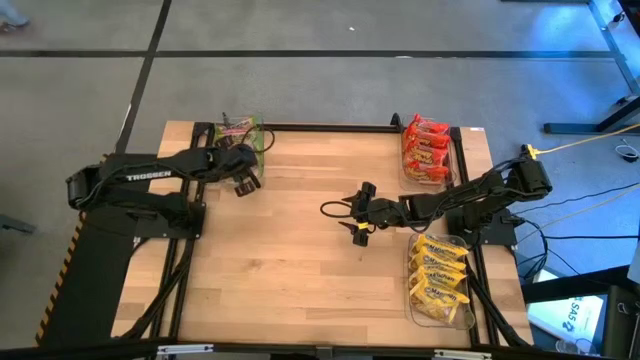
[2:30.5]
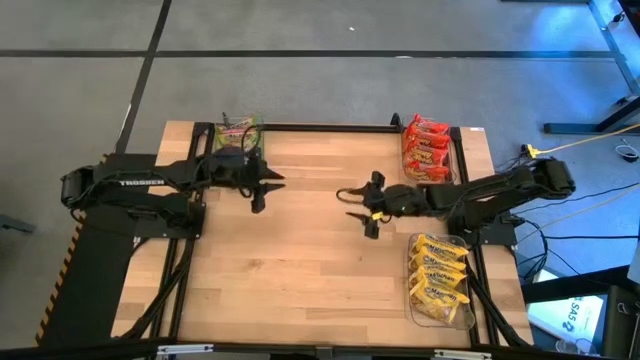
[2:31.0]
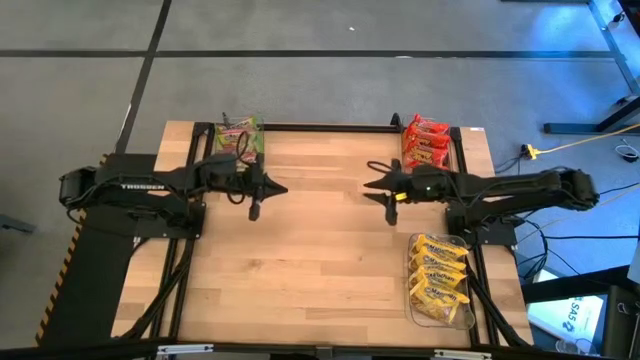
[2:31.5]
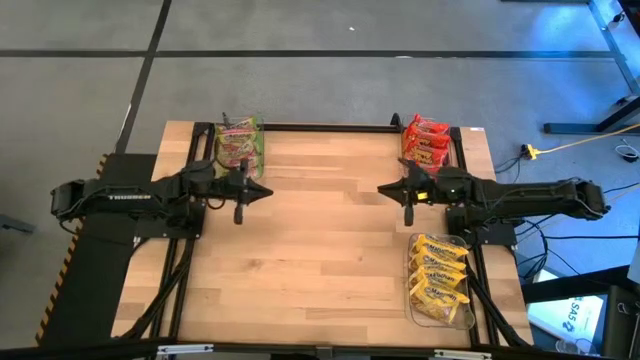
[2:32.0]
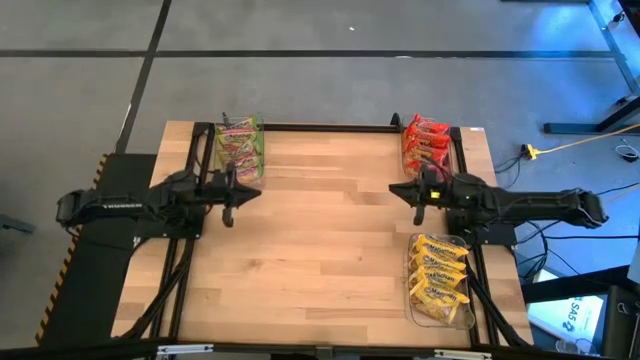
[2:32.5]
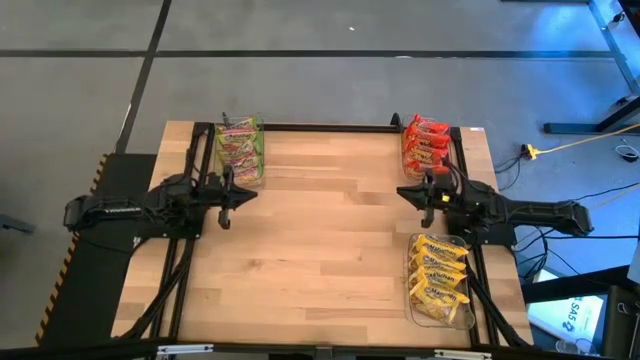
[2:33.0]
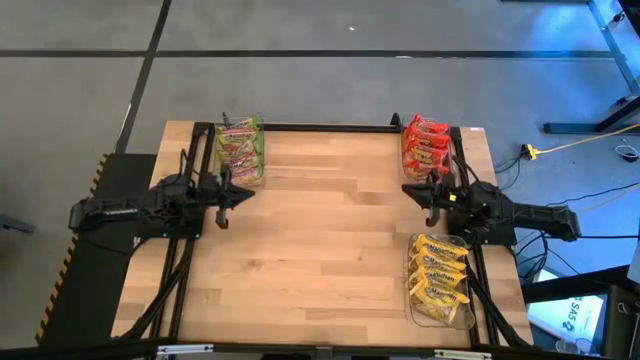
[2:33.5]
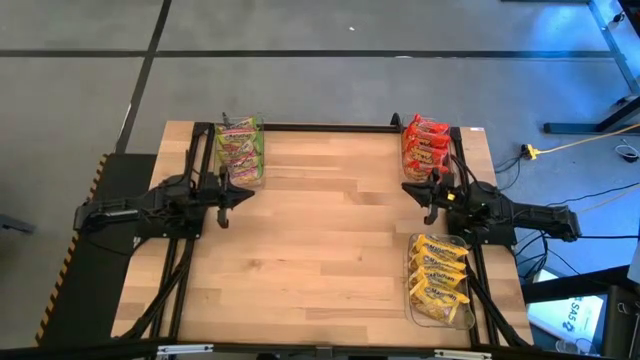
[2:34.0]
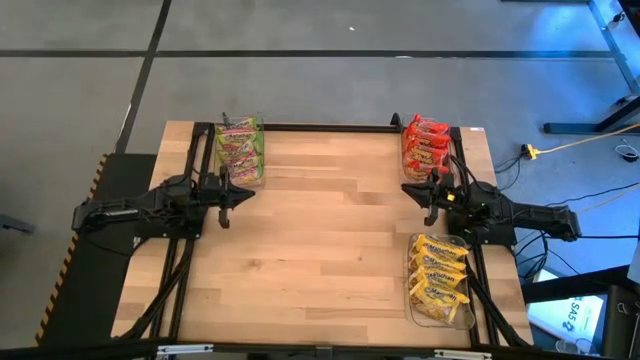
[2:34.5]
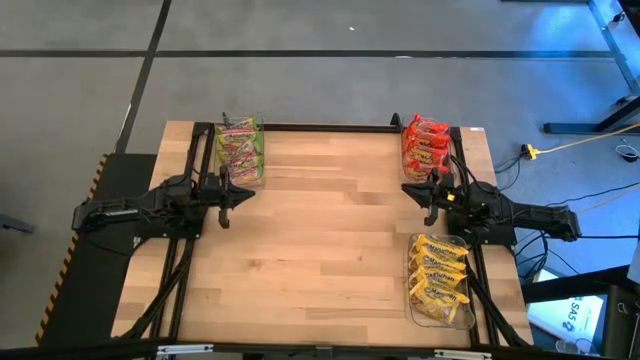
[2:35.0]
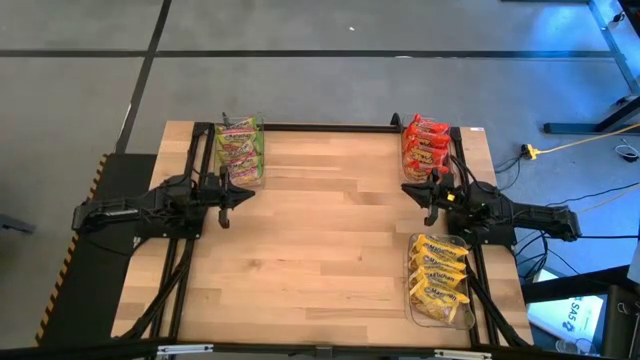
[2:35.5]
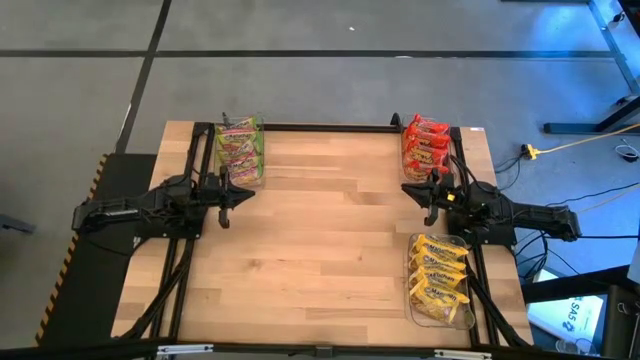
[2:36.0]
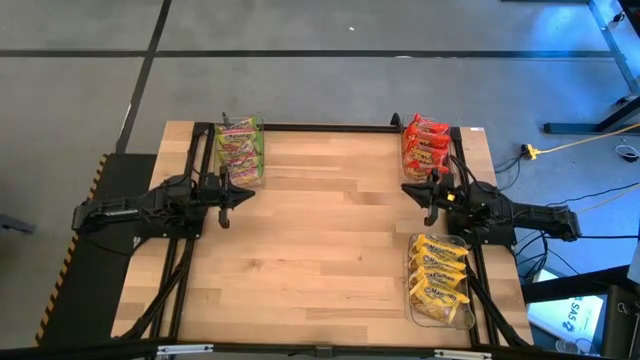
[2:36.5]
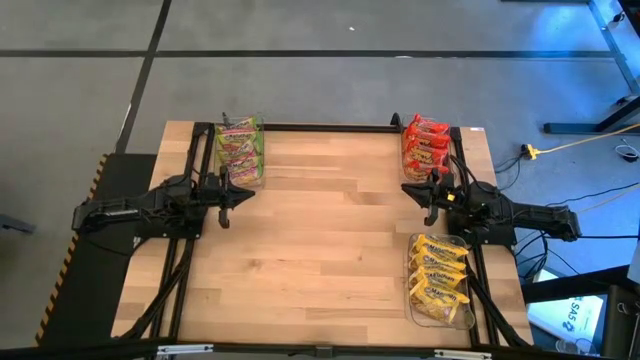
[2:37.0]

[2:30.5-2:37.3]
Task: Sort Maruchan noodles
Return to Home Position

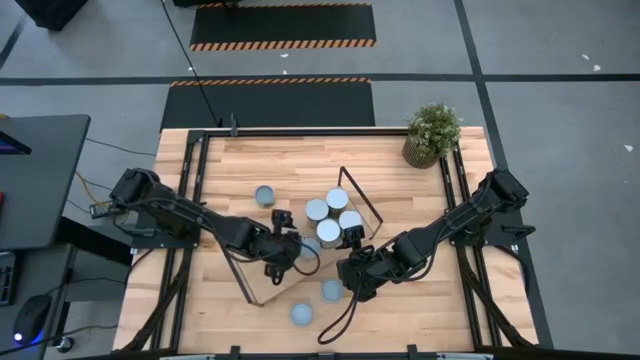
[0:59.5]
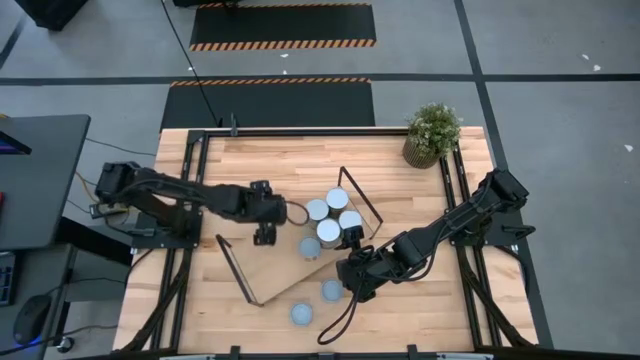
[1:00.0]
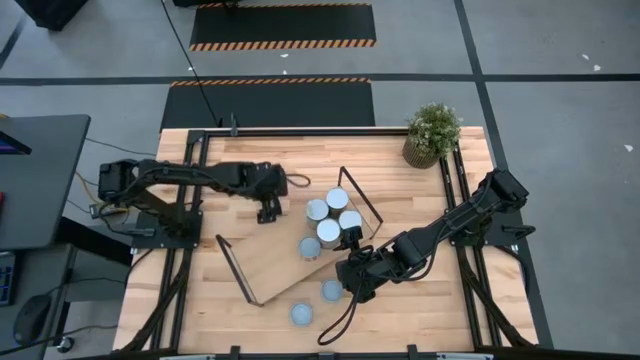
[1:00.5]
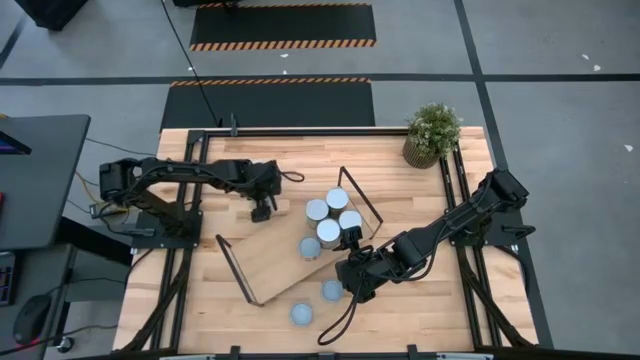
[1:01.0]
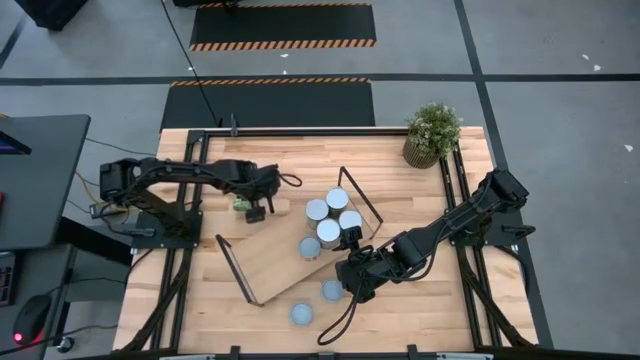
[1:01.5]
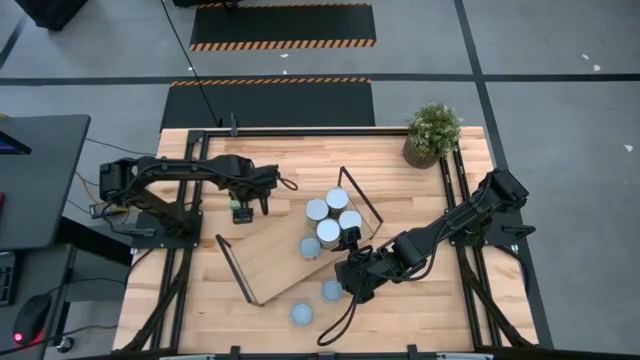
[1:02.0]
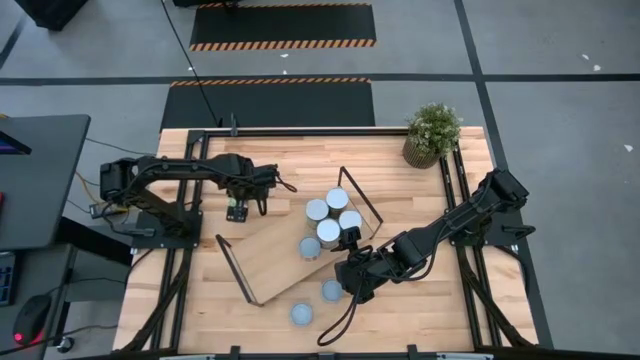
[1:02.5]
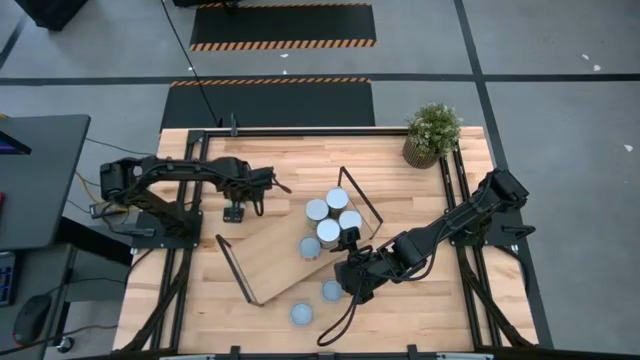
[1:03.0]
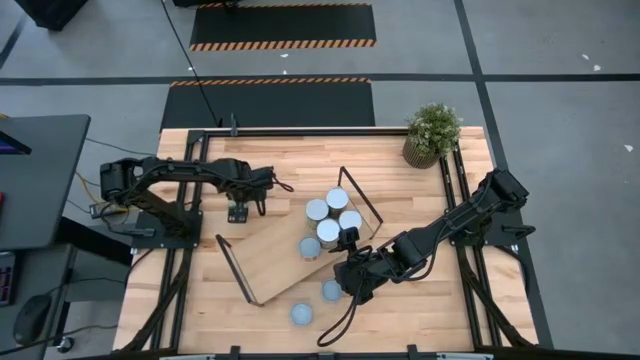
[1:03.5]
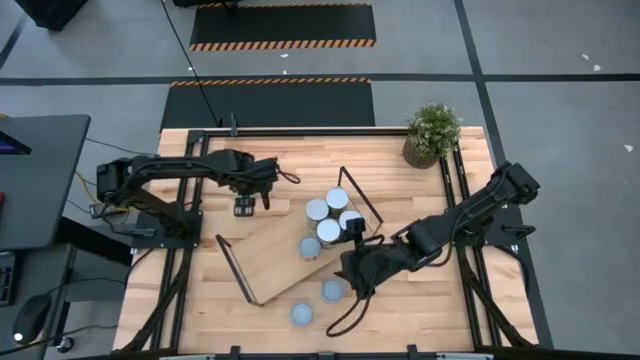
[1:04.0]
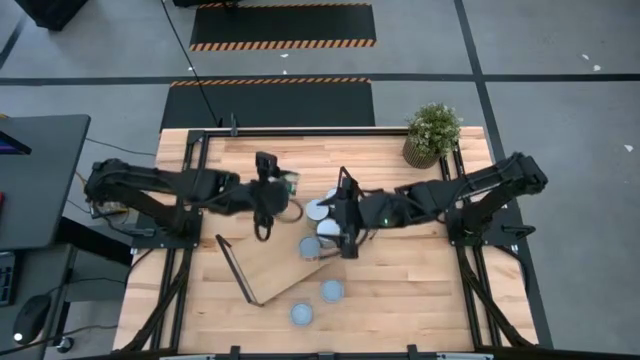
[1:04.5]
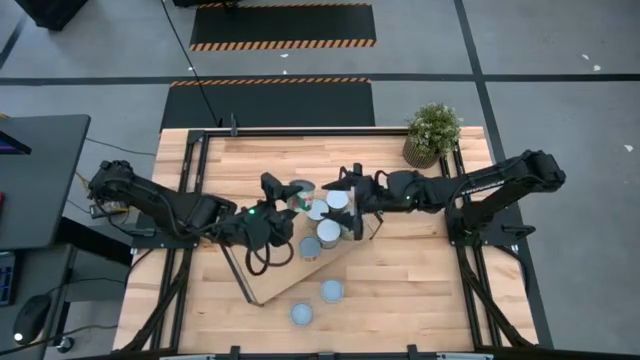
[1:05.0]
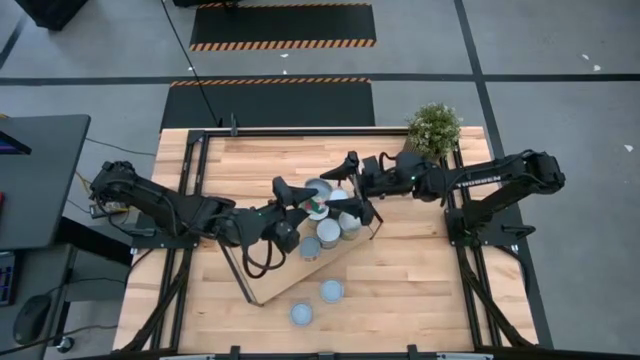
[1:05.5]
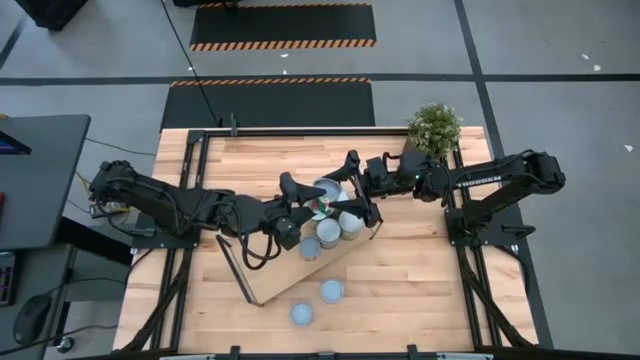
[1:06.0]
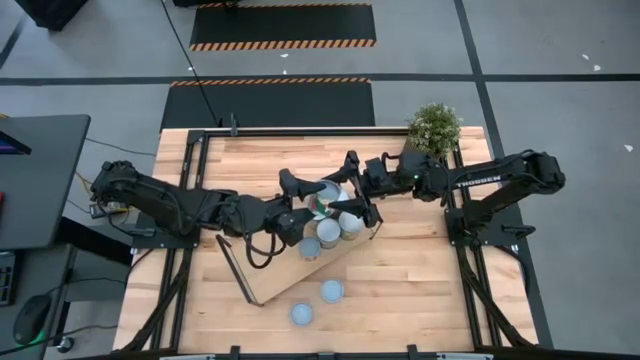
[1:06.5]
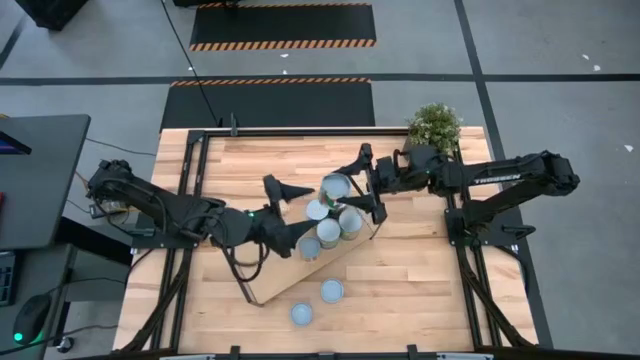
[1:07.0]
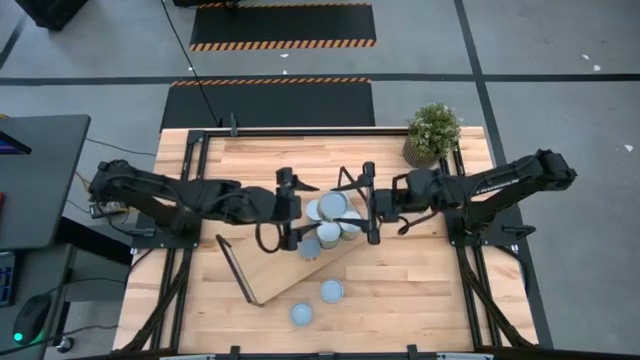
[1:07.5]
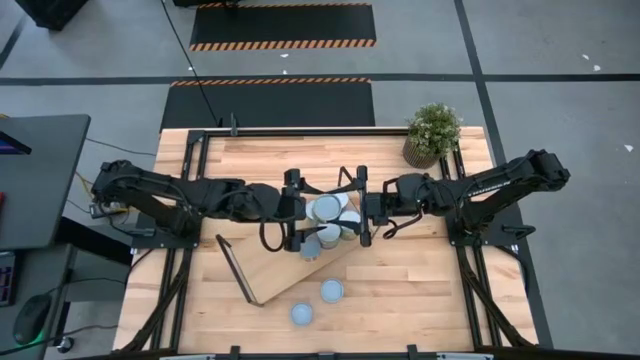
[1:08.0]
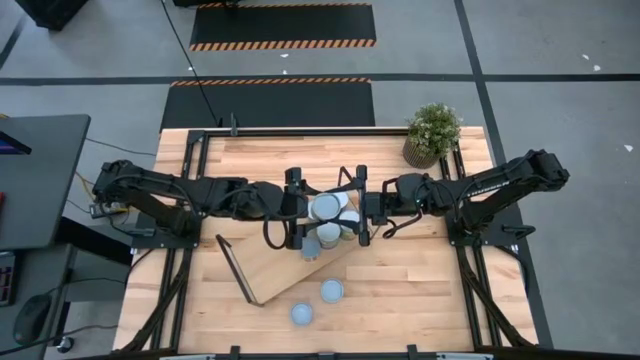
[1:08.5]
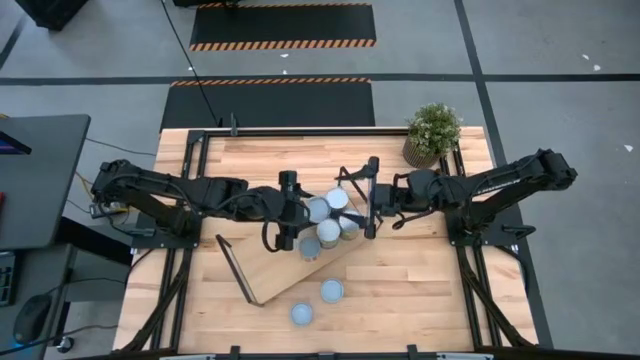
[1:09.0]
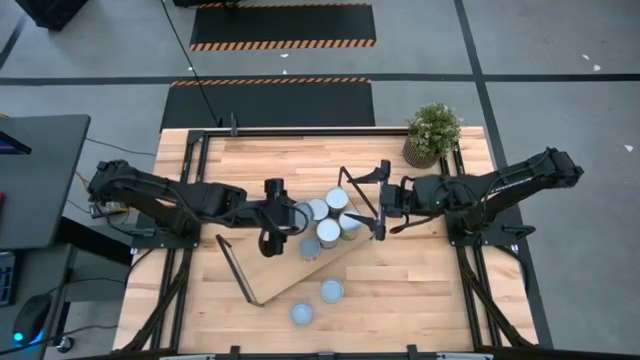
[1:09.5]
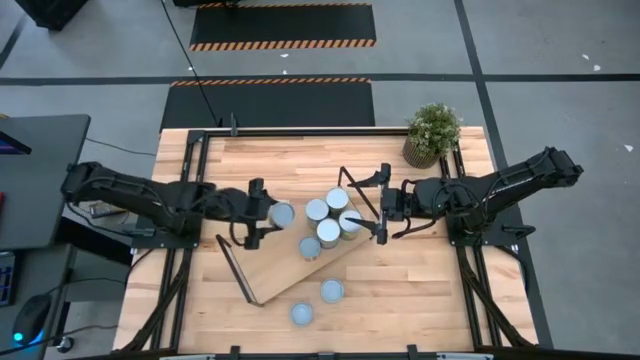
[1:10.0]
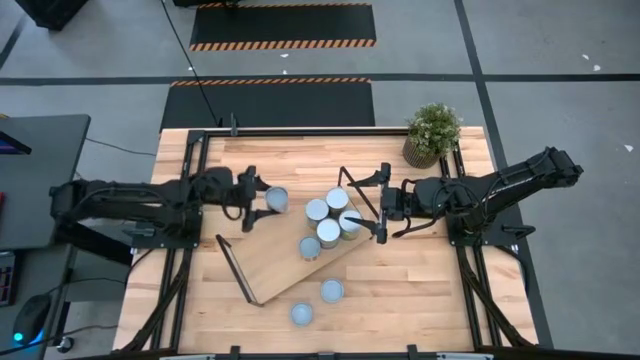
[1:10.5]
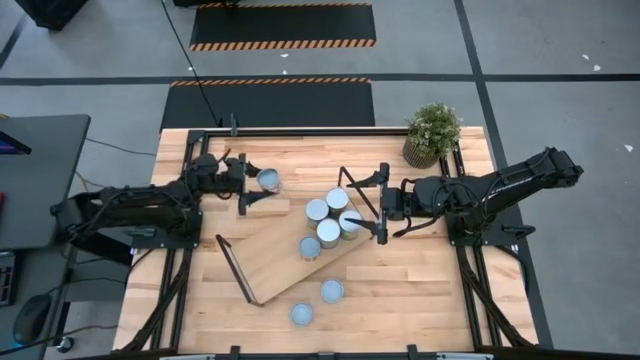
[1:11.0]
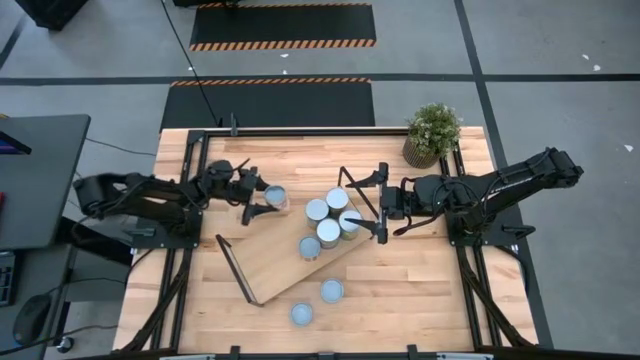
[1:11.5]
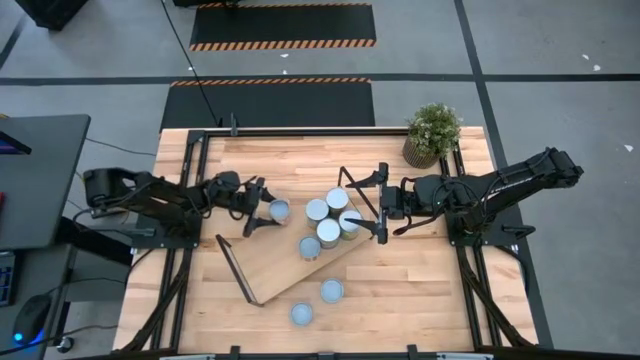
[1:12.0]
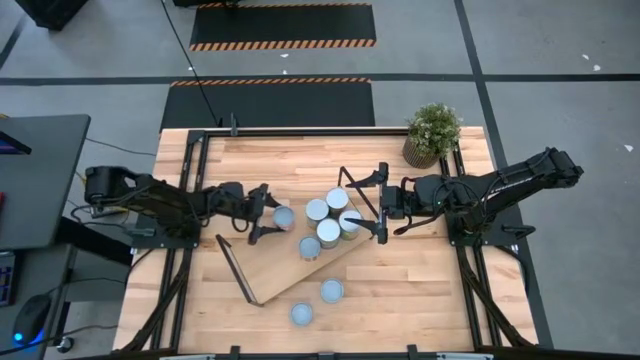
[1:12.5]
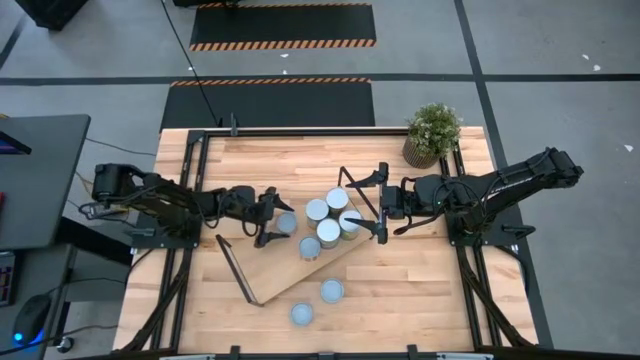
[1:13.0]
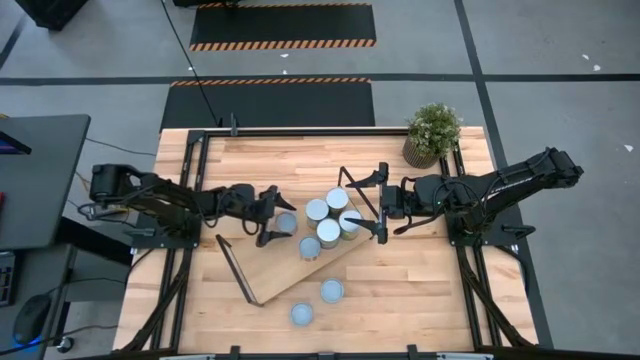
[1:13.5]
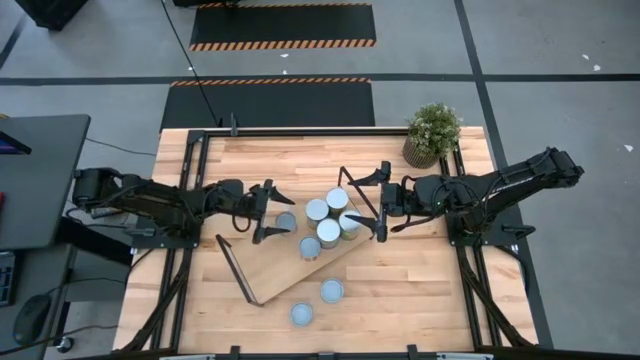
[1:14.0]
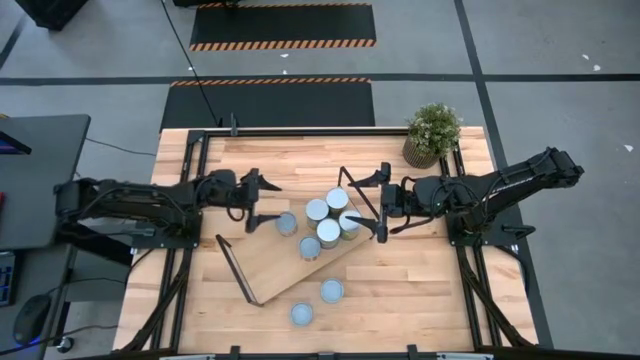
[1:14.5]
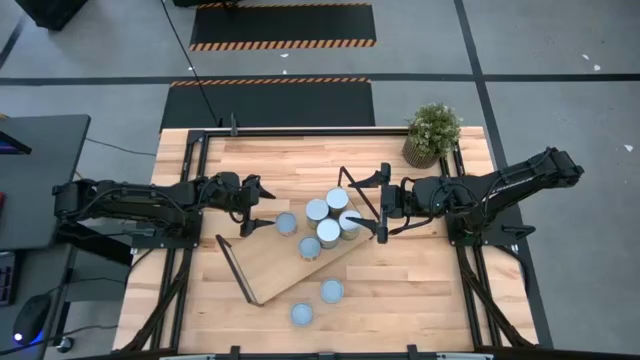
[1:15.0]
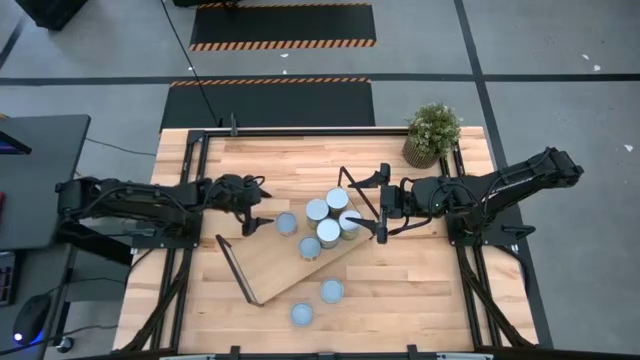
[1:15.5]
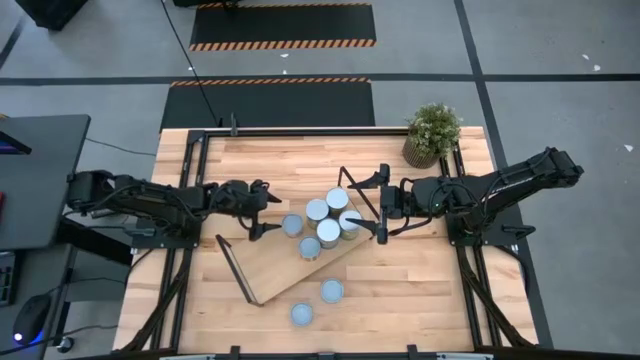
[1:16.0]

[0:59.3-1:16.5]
Task: Pick and place cans onto a shelf
Put the canned peas on the shelf
